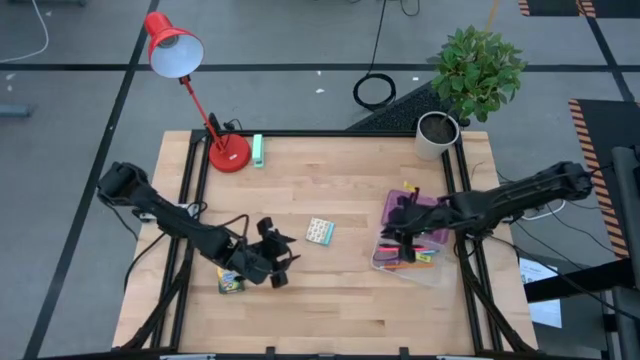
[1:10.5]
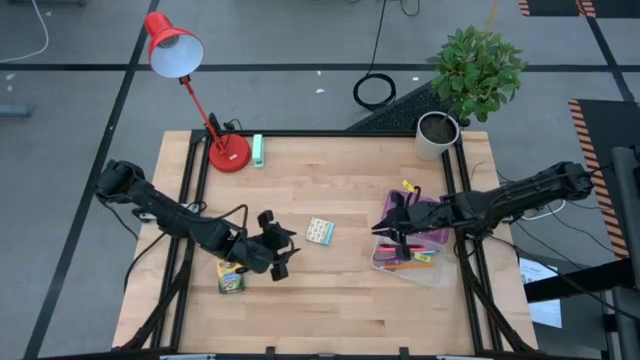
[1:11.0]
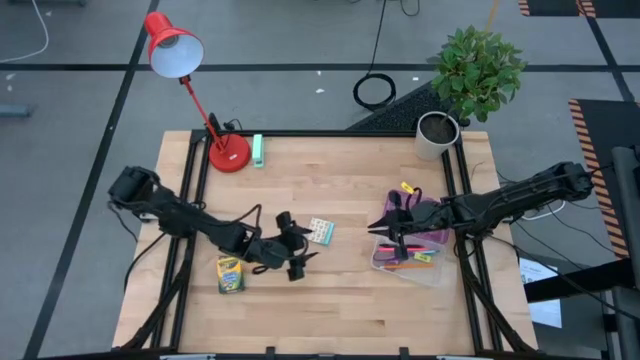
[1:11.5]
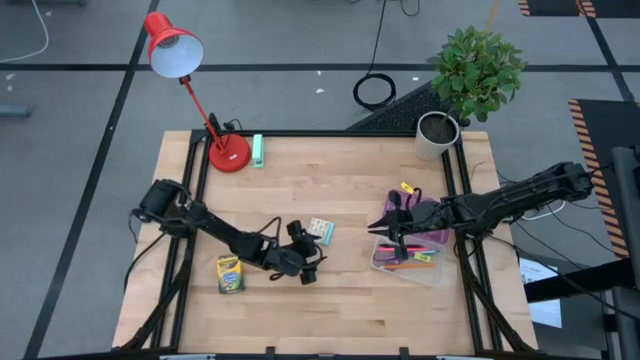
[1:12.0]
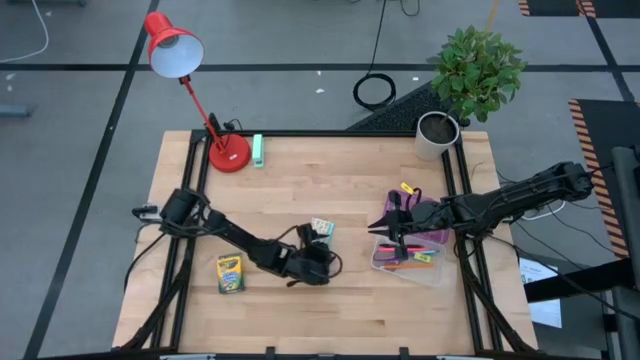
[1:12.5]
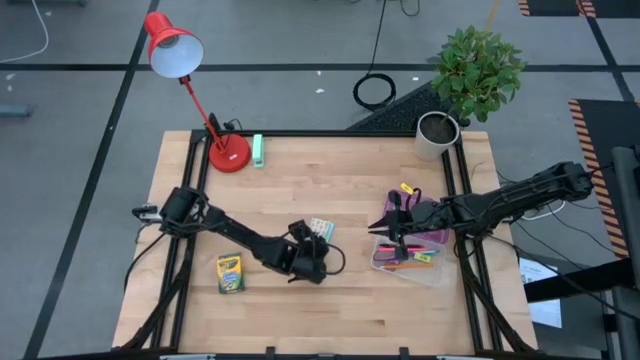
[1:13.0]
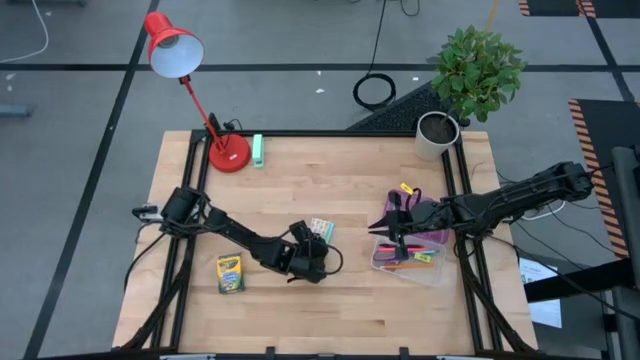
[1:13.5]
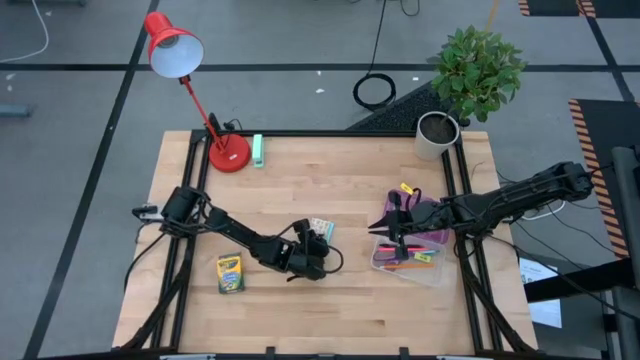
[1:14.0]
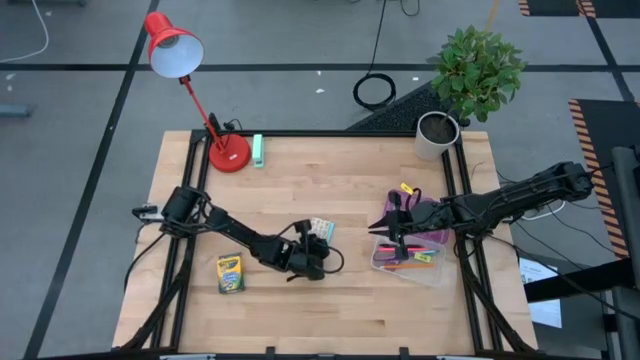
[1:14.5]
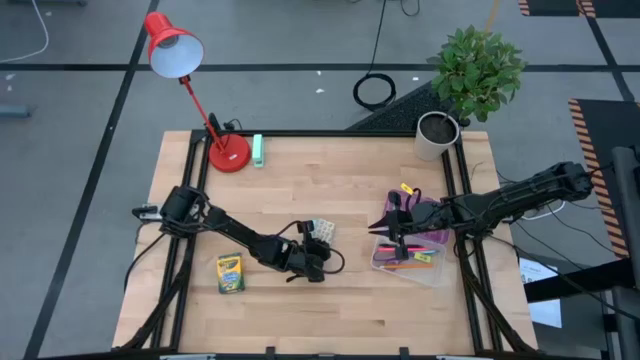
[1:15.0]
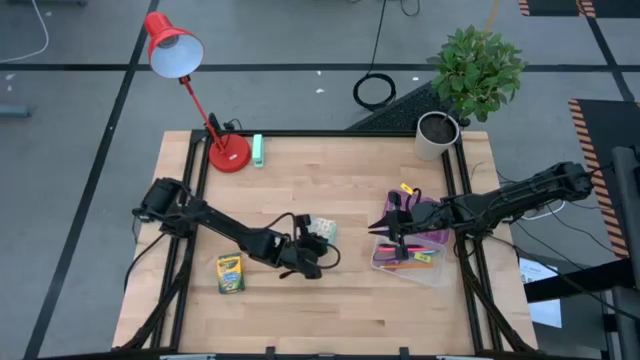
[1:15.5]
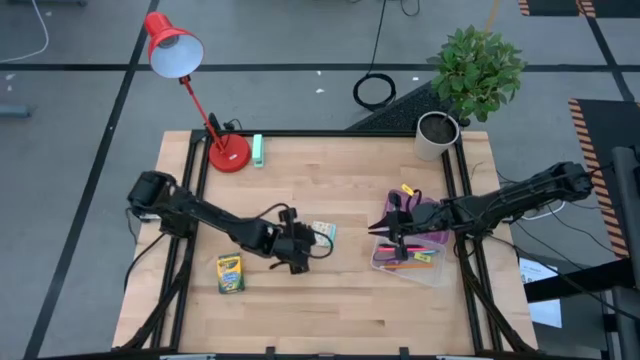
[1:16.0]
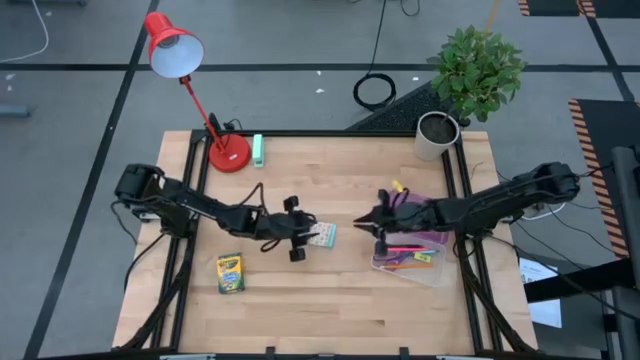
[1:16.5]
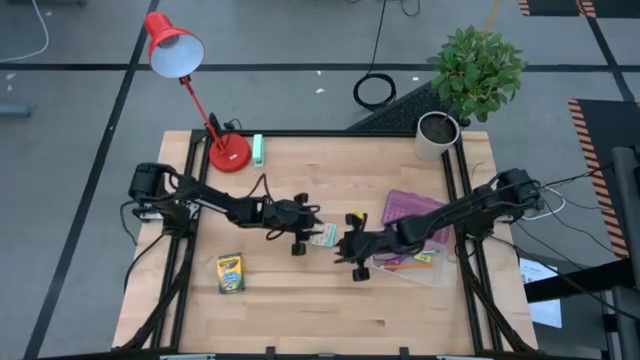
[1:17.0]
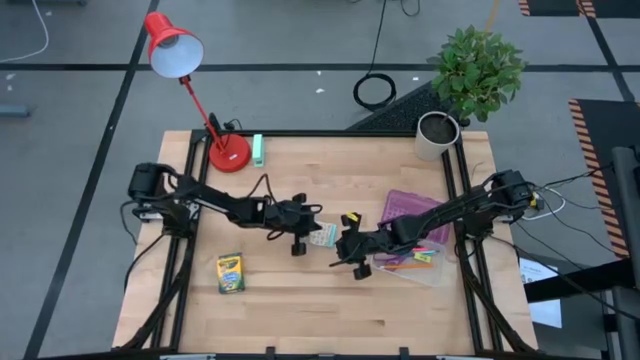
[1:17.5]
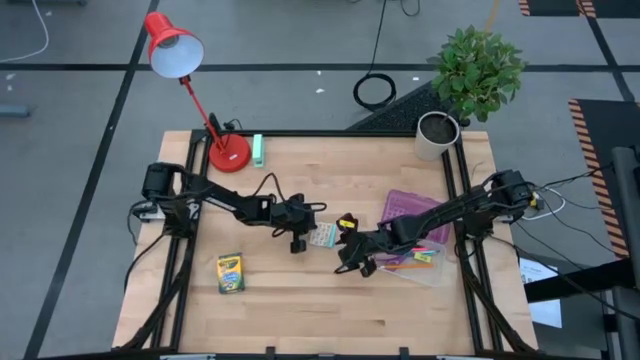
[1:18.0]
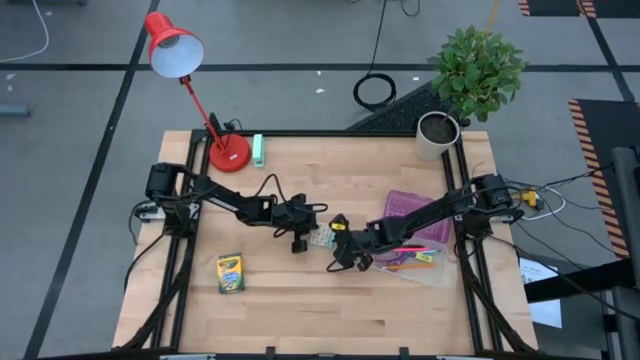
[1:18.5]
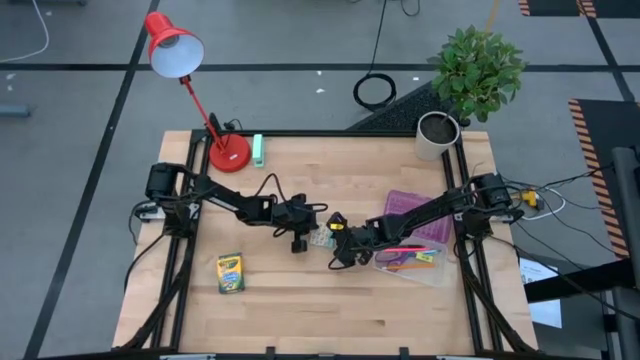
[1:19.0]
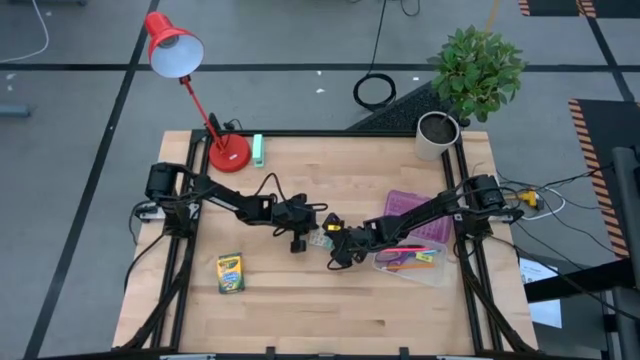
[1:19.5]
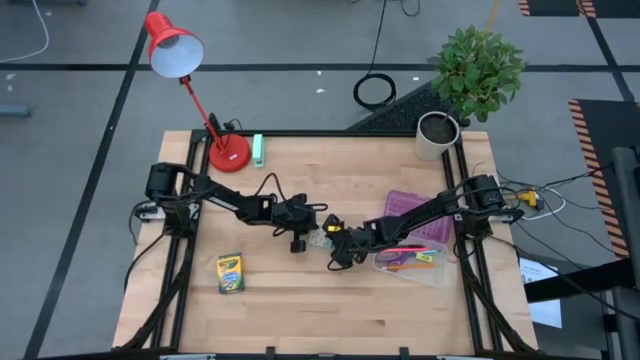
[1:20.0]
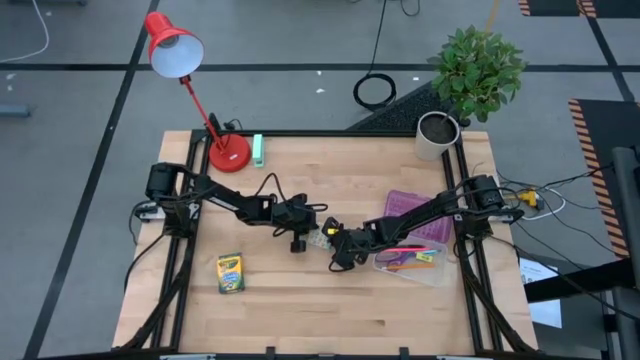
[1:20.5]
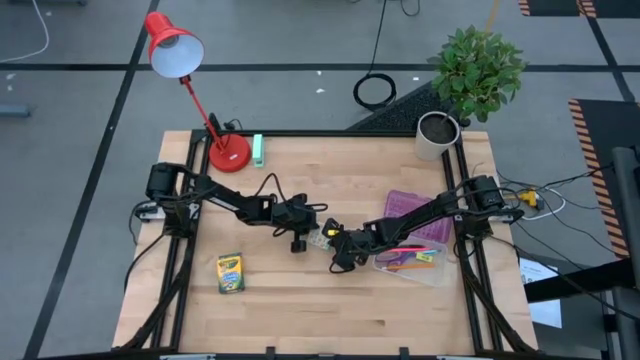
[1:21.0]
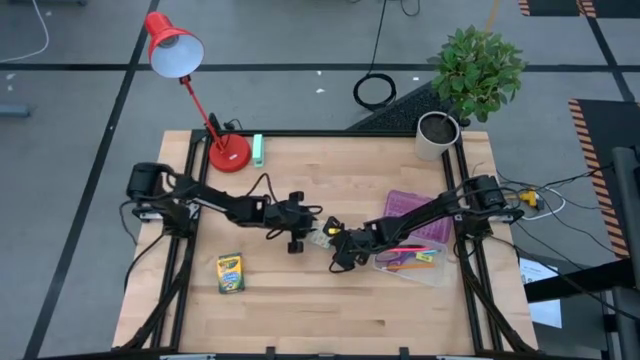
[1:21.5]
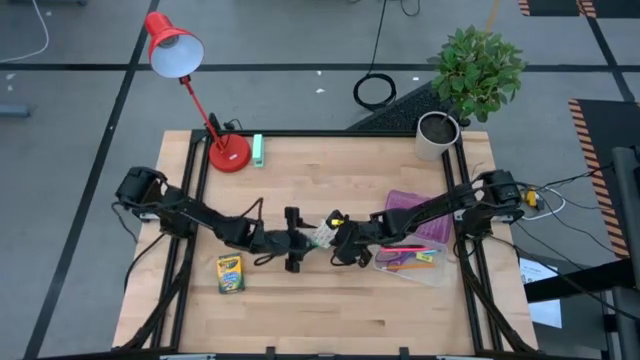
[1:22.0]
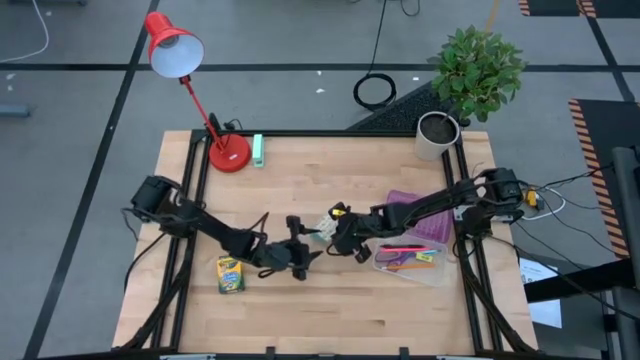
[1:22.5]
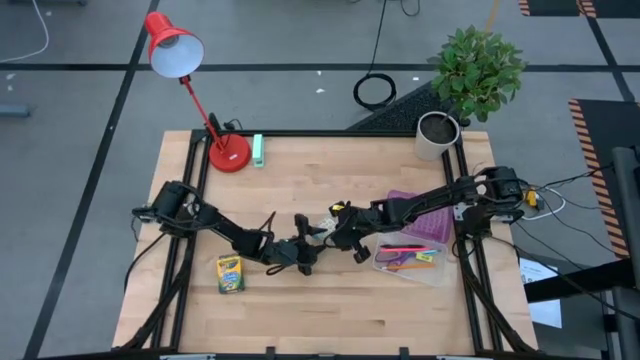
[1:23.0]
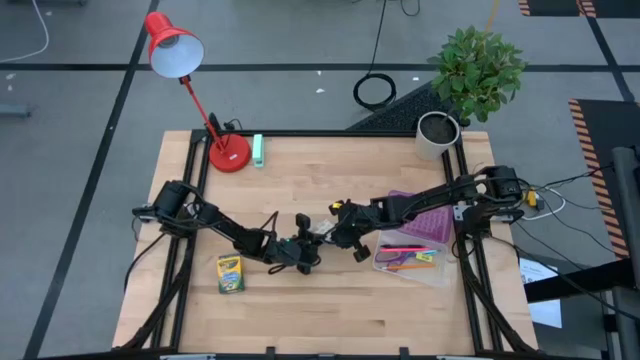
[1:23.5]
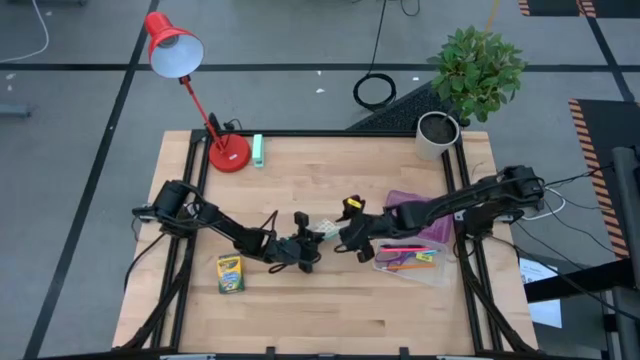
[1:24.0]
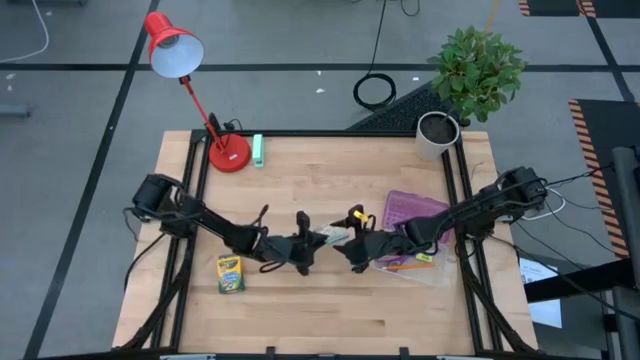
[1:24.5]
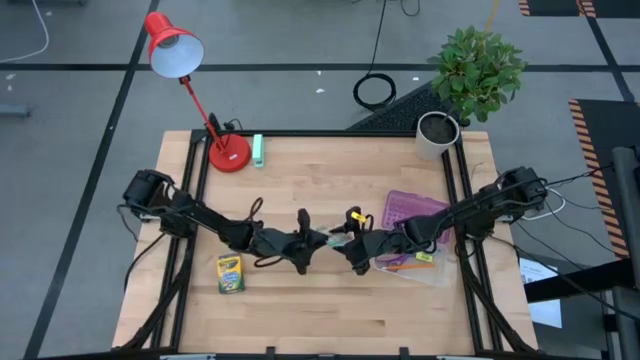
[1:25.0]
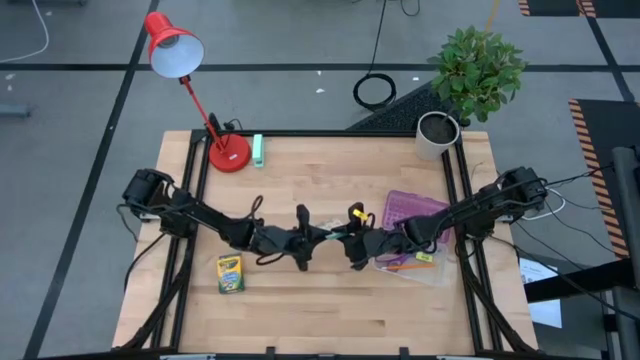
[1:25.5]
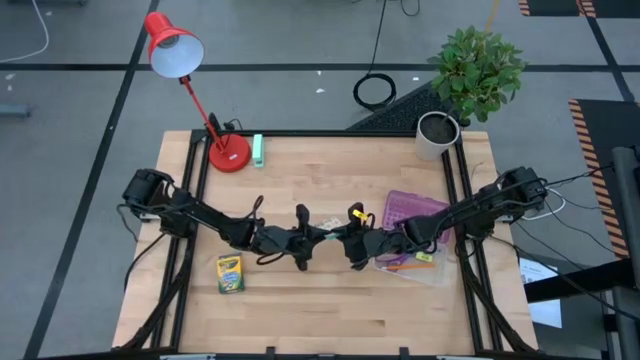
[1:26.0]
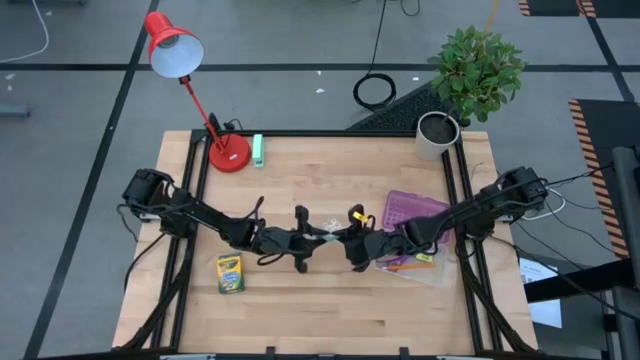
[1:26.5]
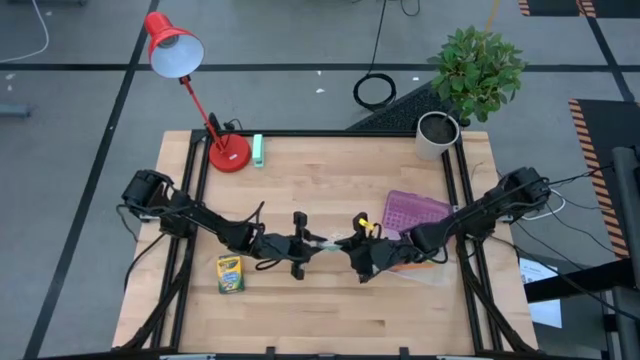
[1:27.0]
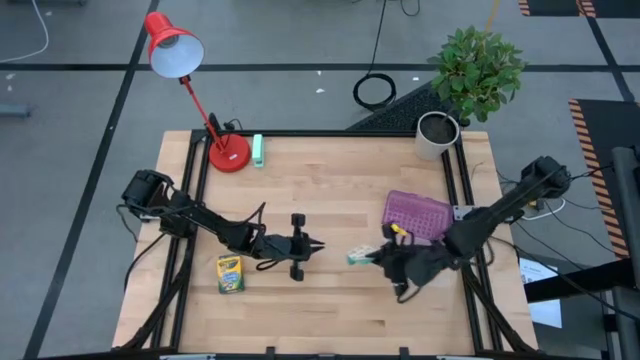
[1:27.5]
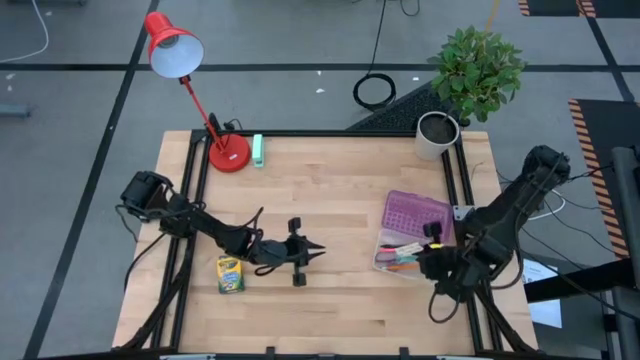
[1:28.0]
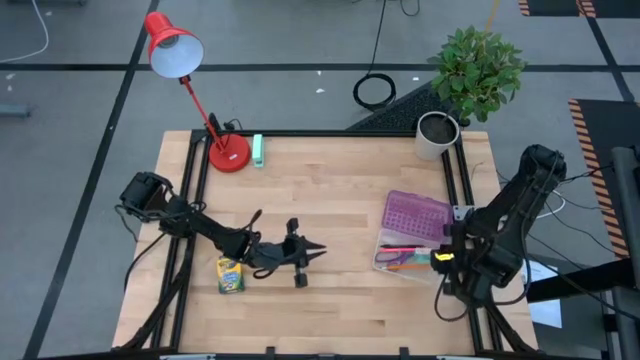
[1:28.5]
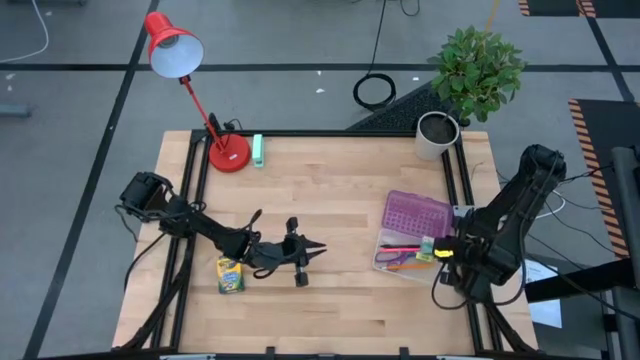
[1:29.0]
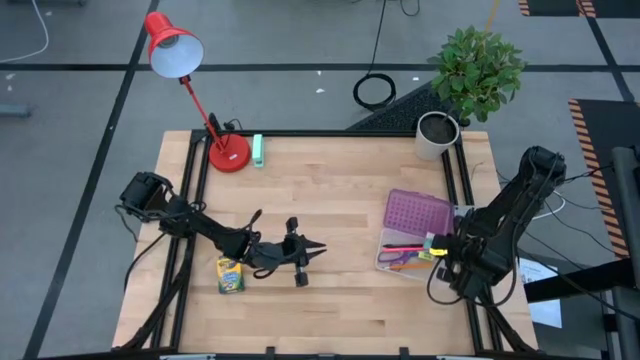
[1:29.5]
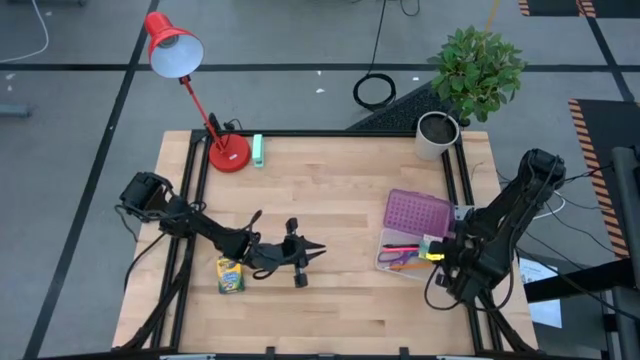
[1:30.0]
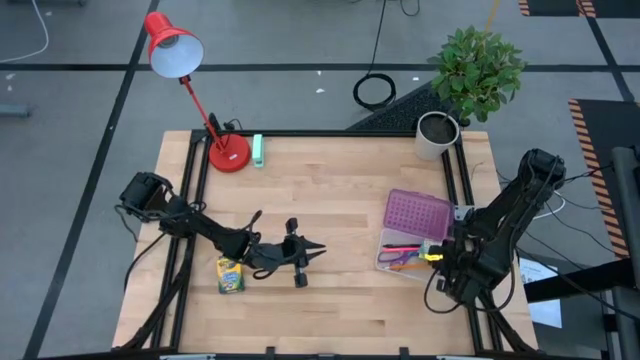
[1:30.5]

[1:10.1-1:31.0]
Task: Pack school essentials
Put the sticky notes into the supply box

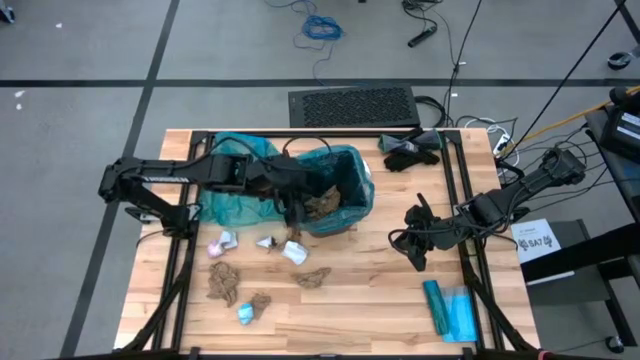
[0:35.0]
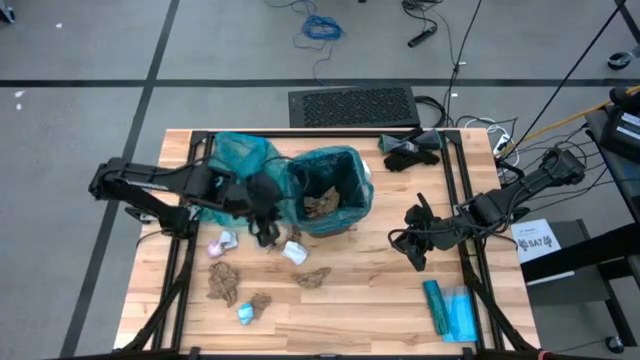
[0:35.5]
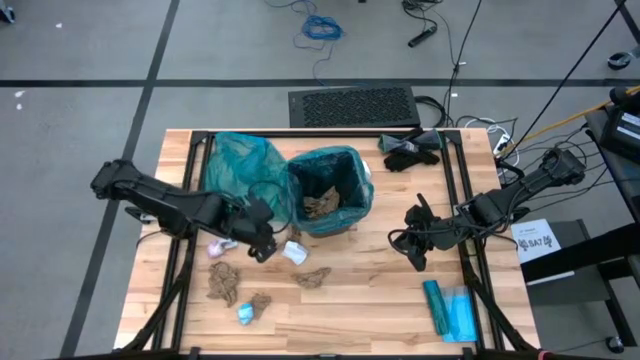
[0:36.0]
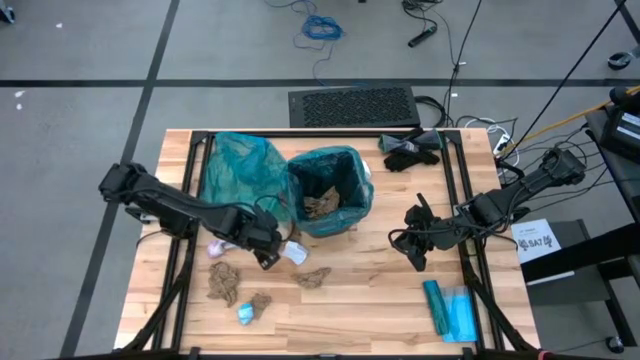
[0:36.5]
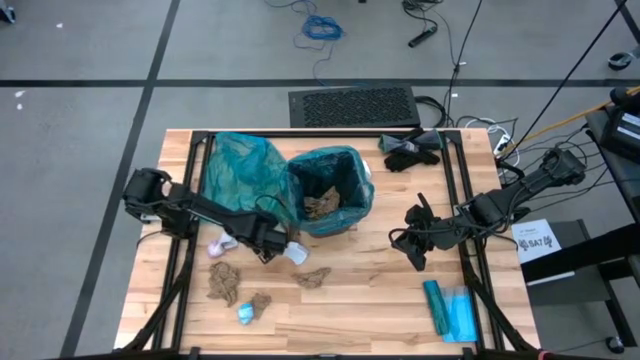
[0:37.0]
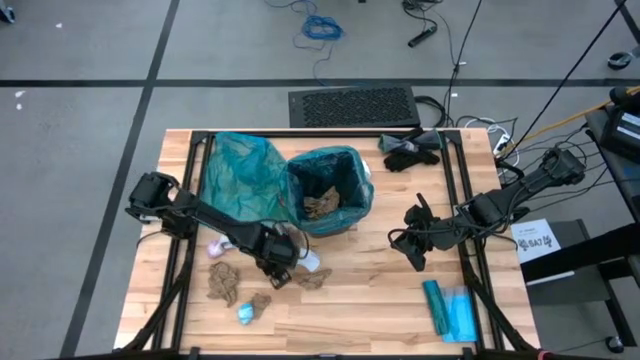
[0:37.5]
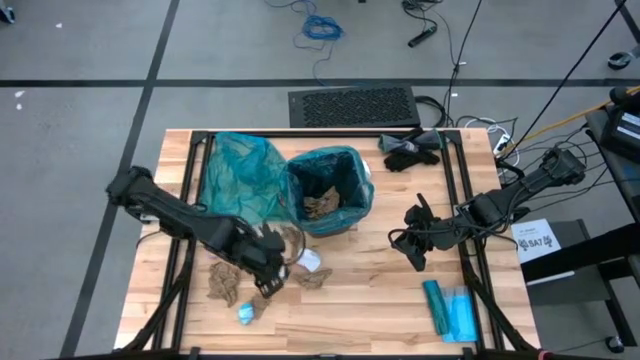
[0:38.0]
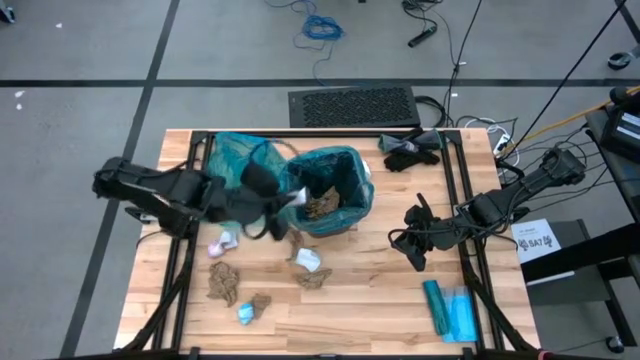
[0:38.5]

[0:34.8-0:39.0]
Task: place trash/remove bag and relplace
Put the white paper into the trash bin
